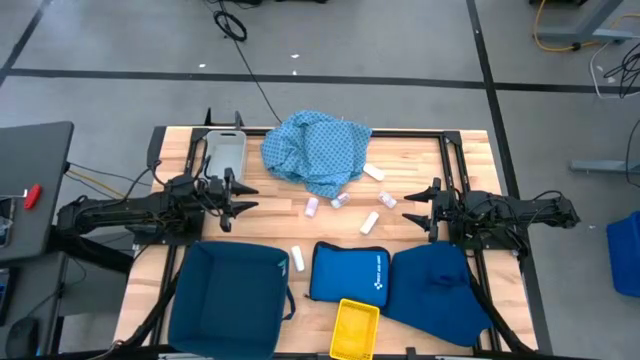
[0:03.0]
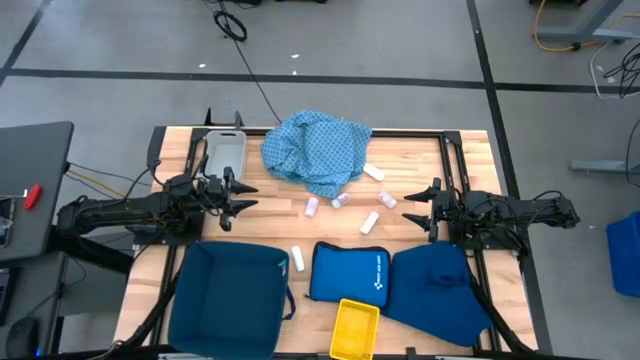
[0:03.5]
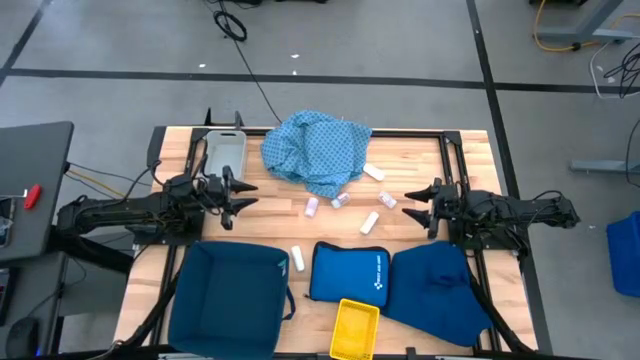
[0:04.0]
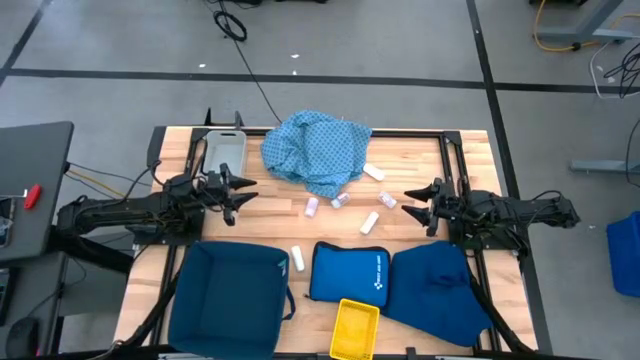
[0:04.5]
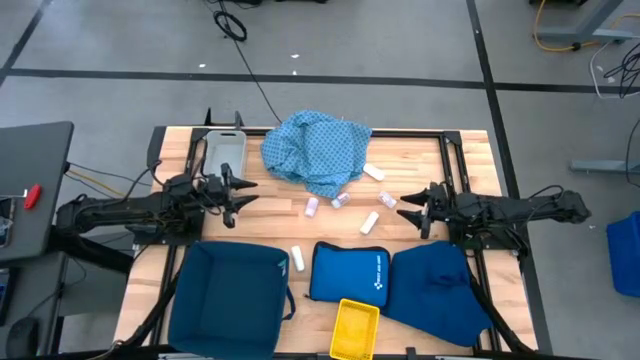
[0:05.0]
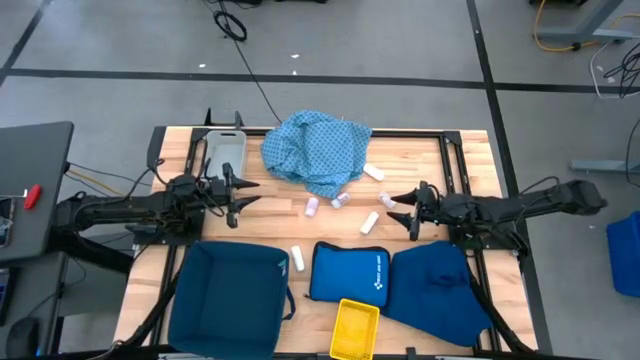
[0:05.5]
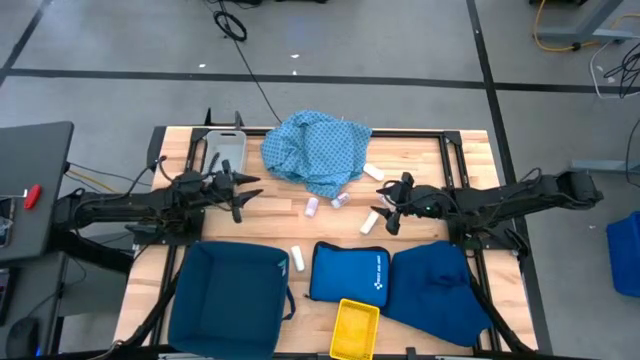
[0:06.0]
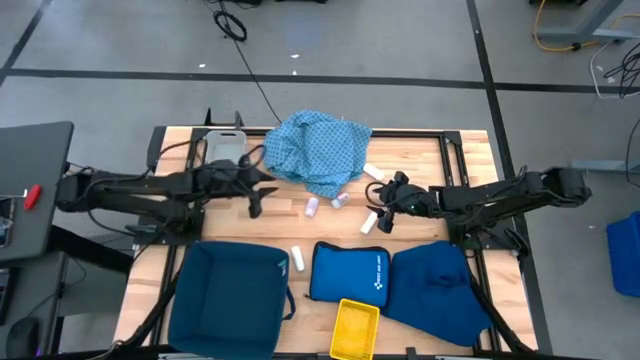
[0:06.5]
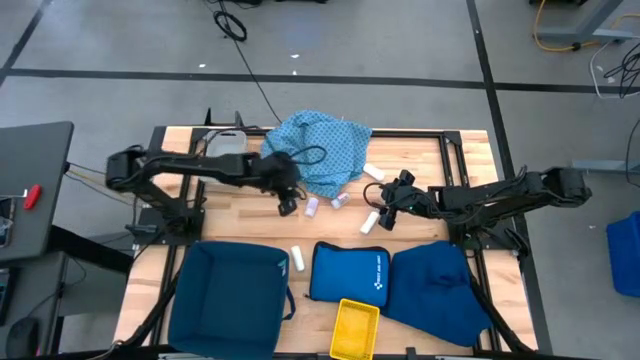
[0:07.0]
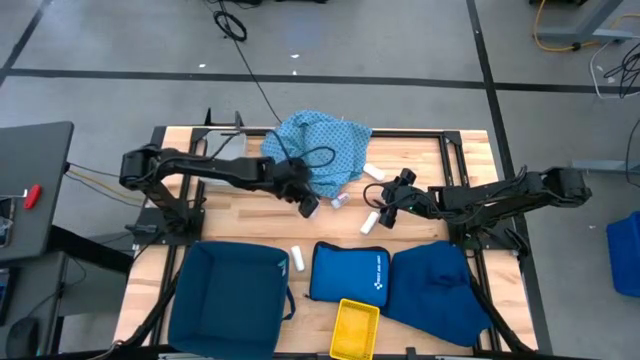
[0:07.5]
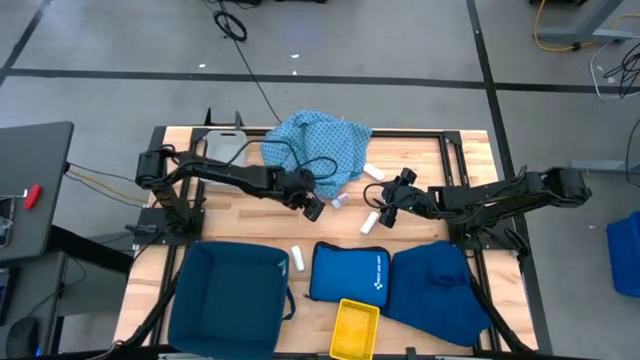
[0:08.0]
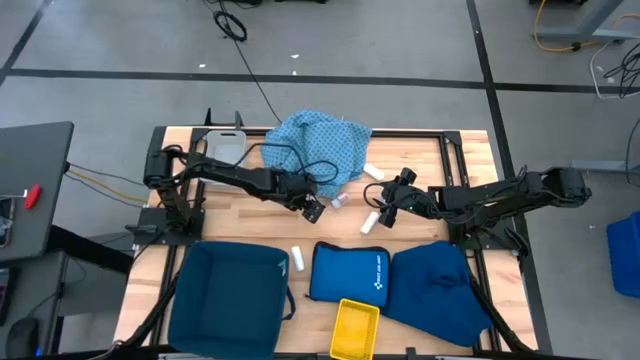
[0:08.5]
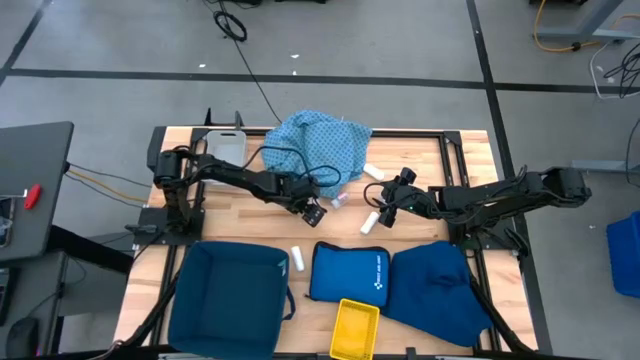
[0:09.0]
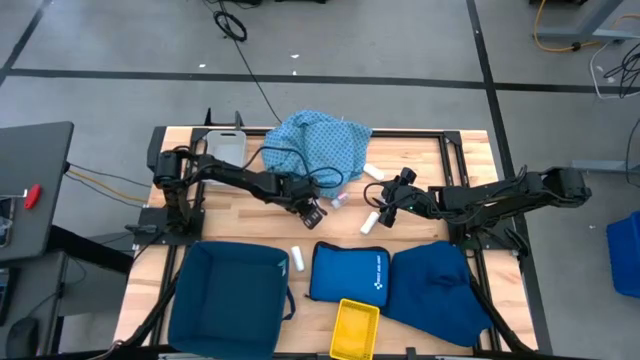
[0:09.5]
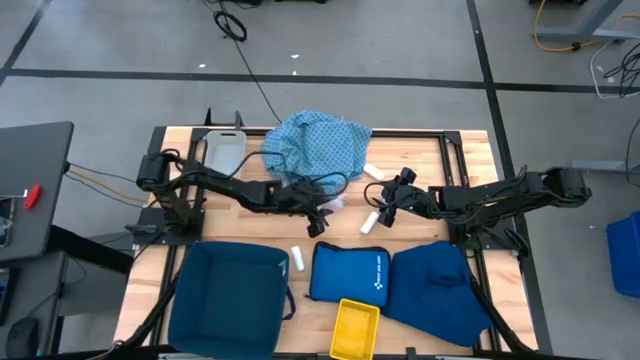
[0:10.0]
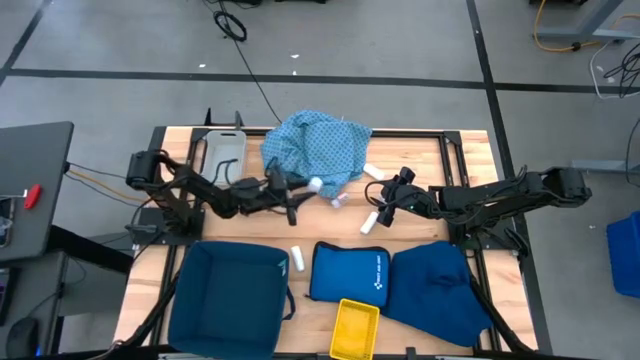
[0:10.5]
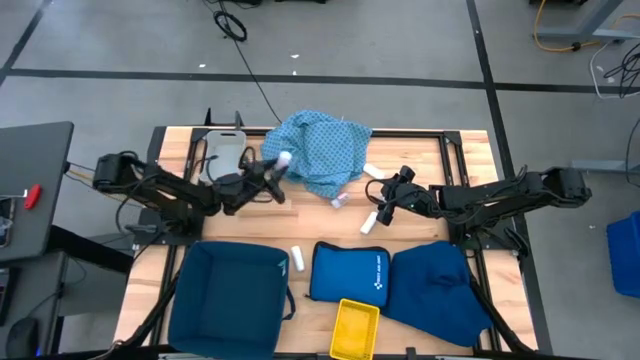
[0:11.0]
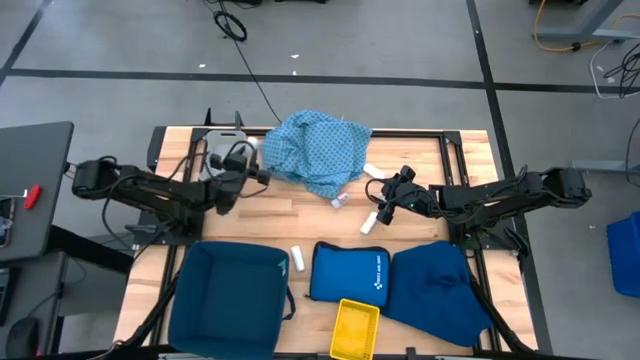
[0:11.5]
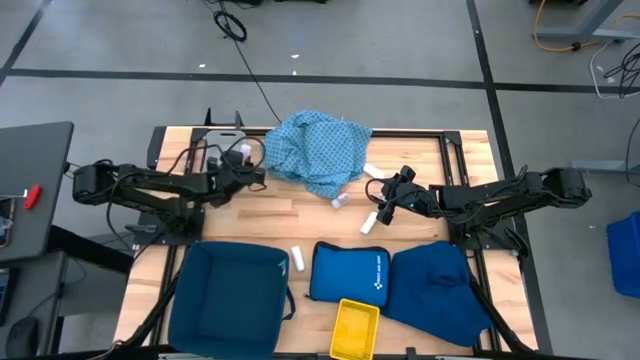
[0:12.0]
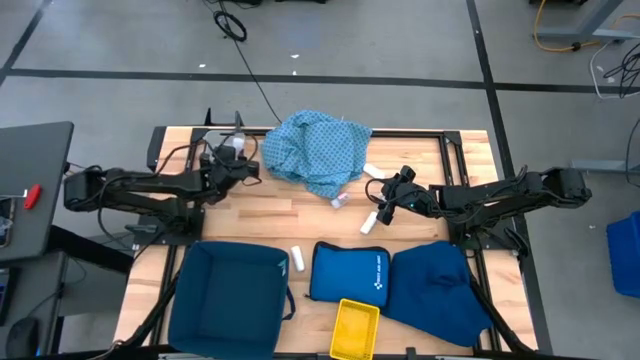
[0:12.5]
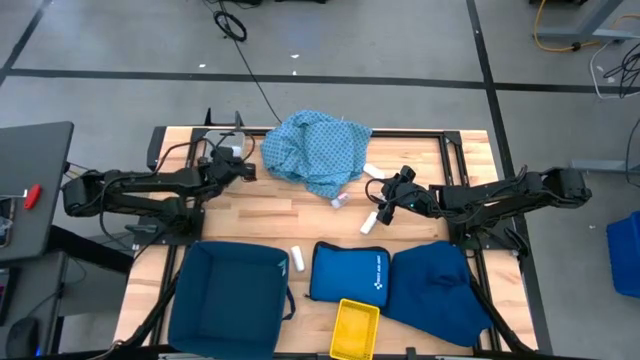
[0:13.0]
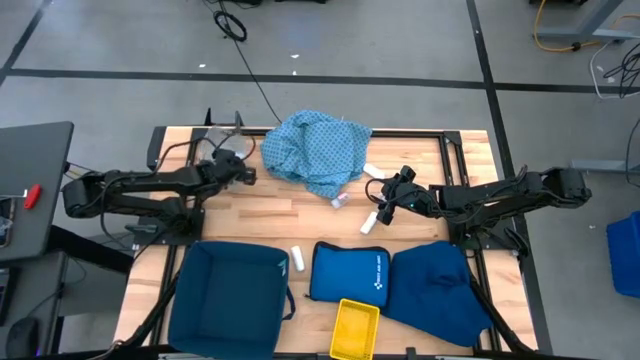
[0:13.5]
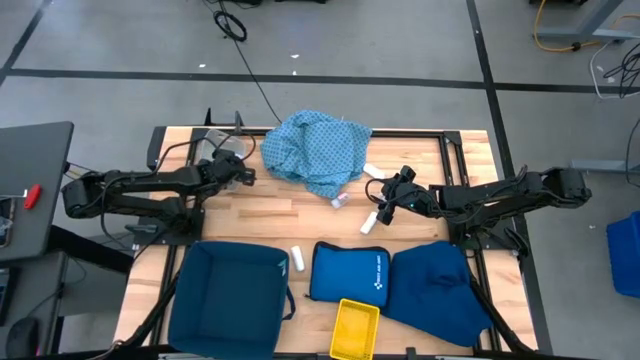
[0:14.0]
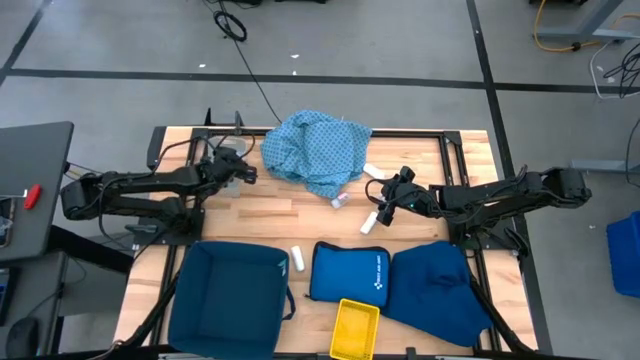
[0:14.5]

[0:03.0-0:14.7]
Task: Pick & place medical supplies in basket/bin
Put the white pill bottle into the gray bin

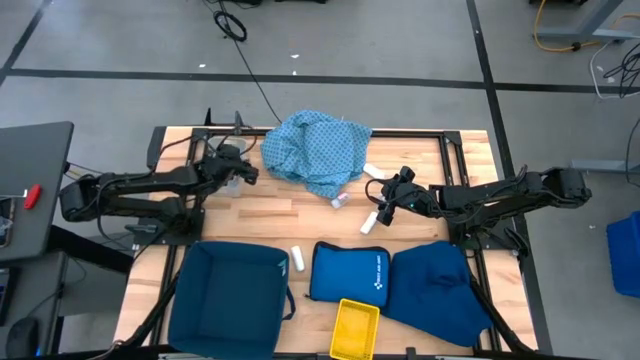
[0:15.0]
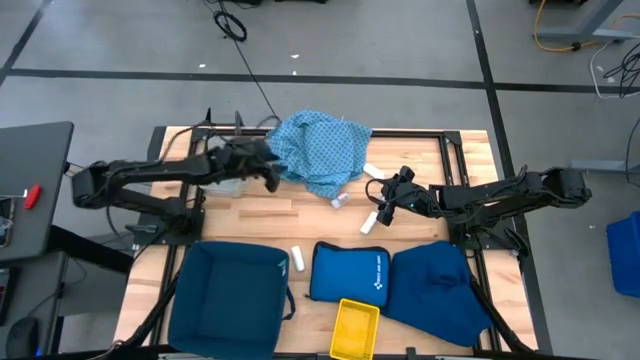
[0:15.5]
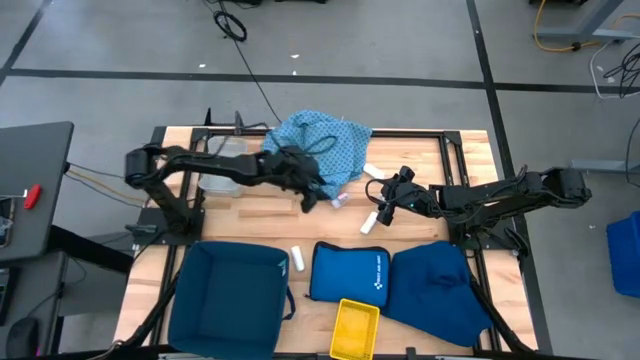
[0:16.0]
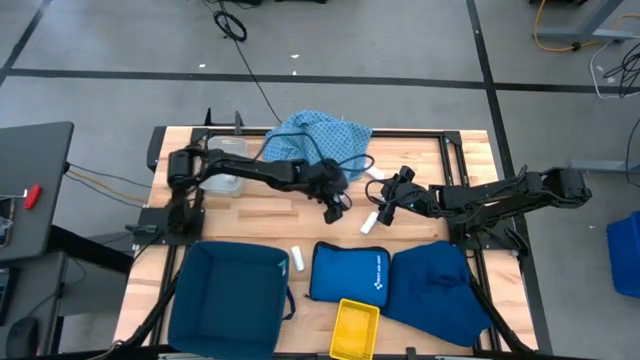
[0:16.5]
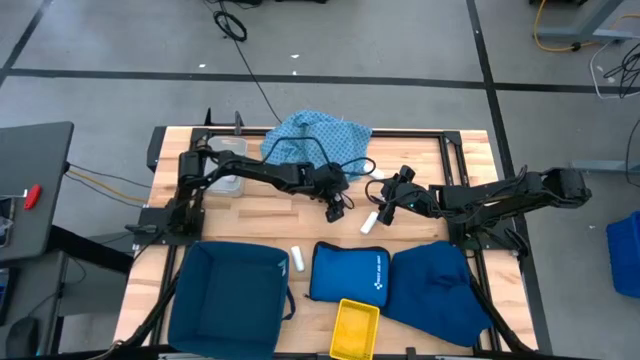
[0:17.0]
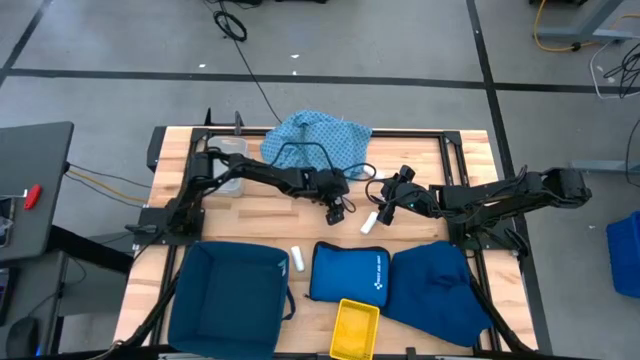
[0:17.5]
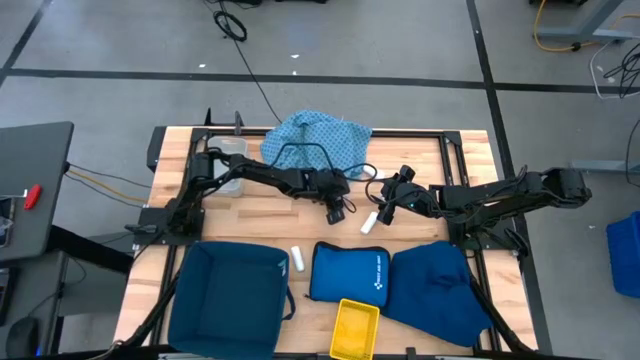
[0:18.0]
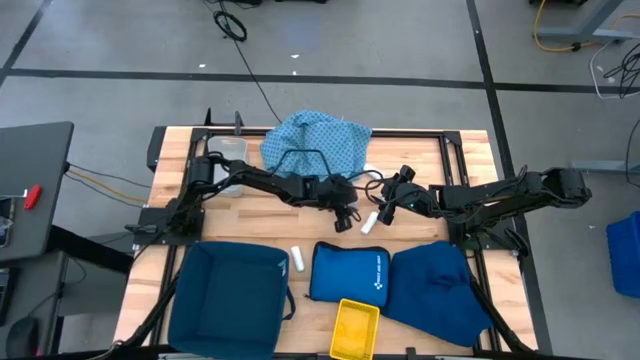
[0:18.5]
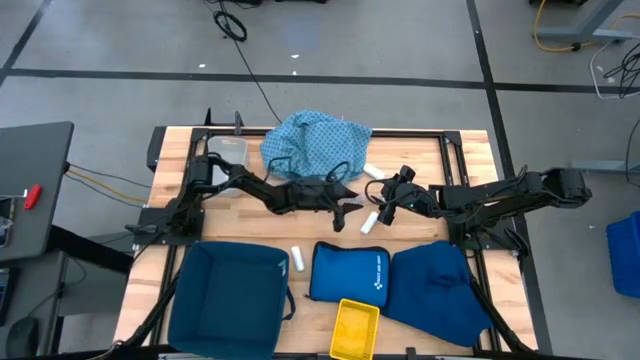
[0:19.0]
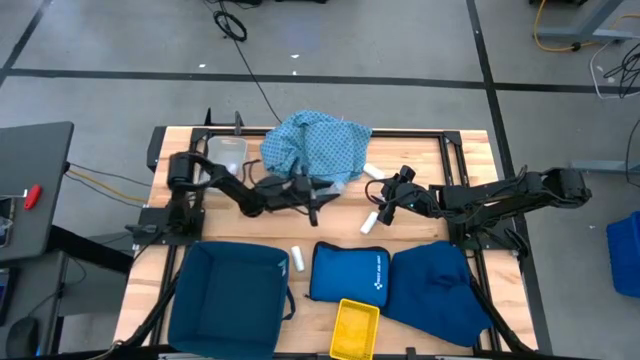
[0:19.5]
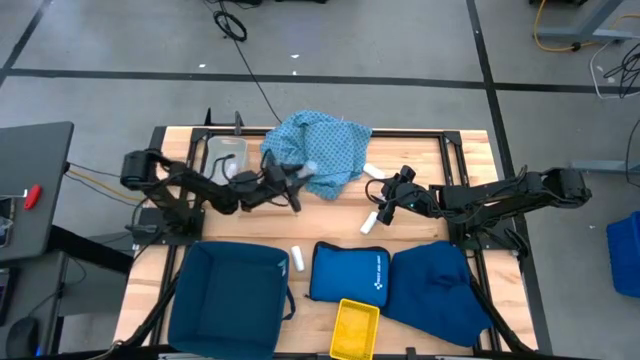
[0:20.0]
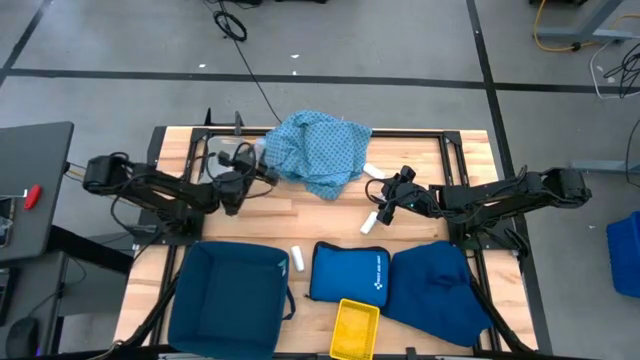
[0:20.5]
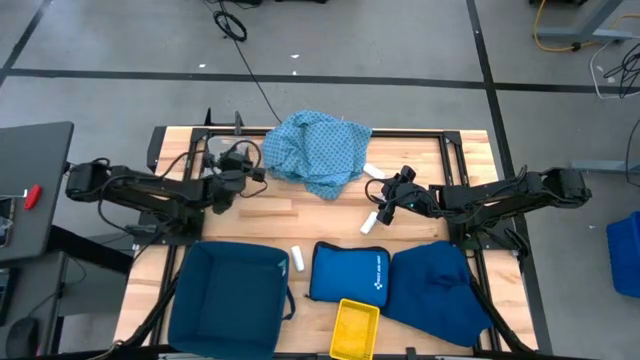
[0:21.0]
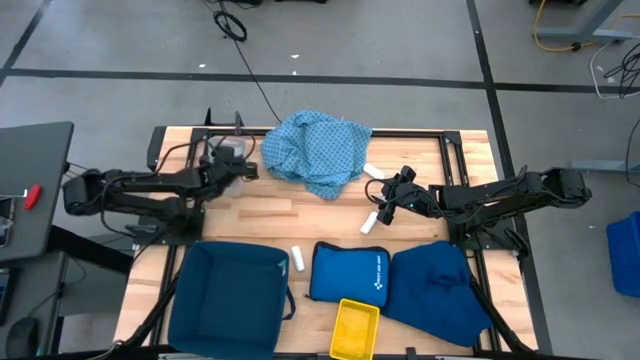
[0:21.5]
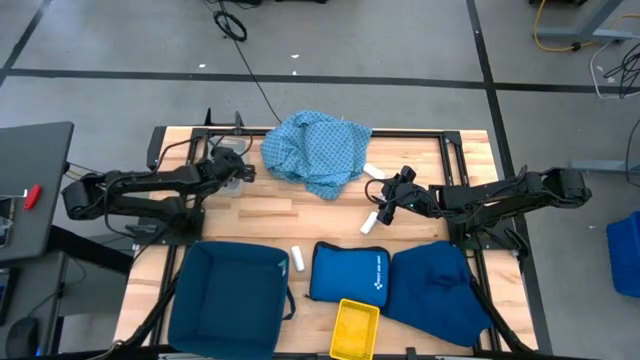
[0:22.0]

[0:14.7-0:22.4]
Put the left transparent pill bottle into the gray bin

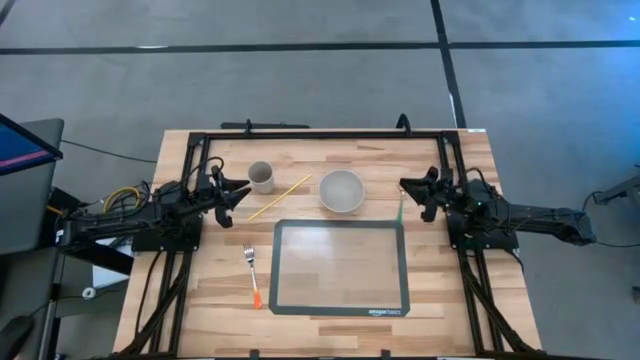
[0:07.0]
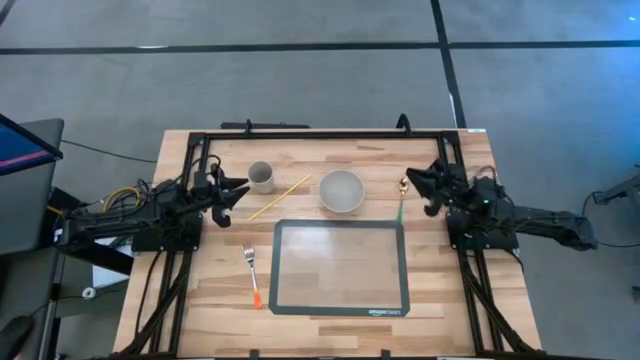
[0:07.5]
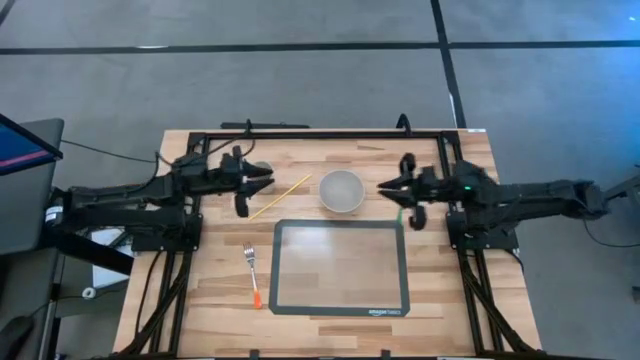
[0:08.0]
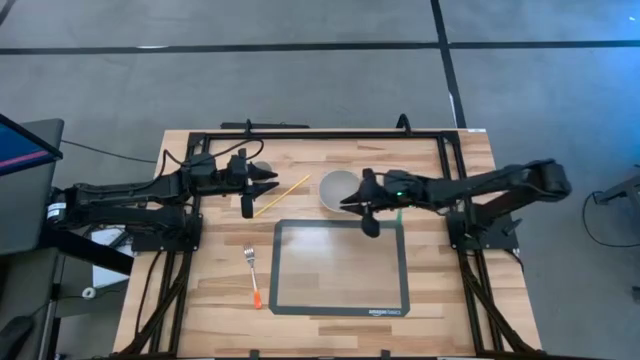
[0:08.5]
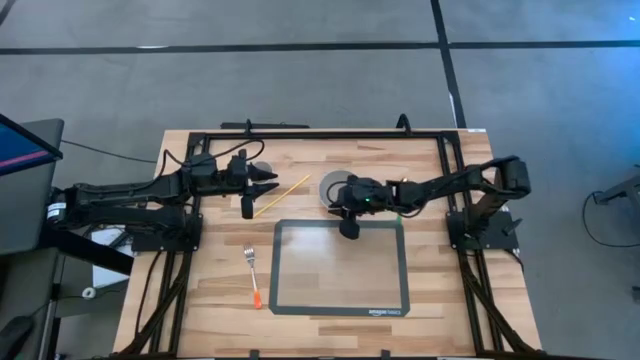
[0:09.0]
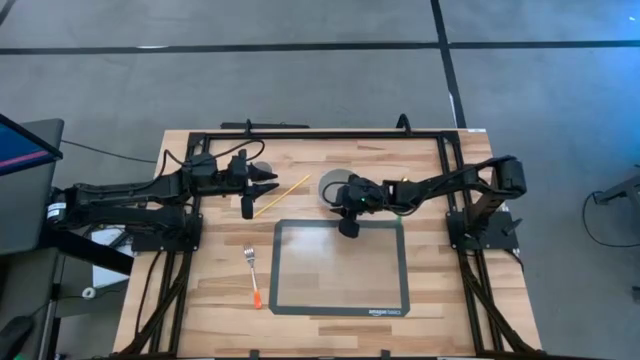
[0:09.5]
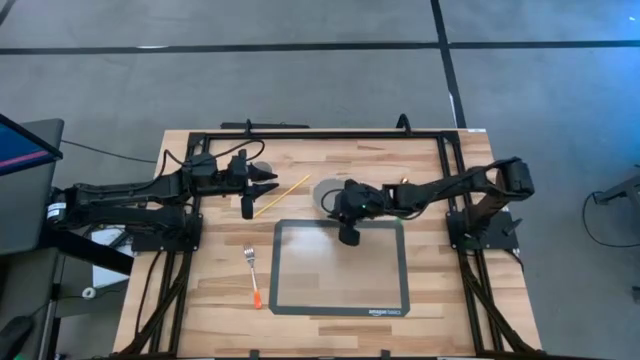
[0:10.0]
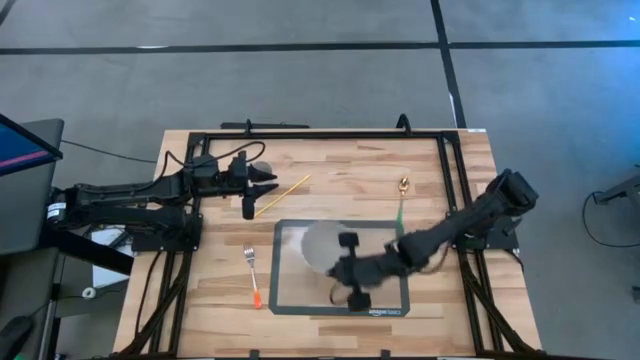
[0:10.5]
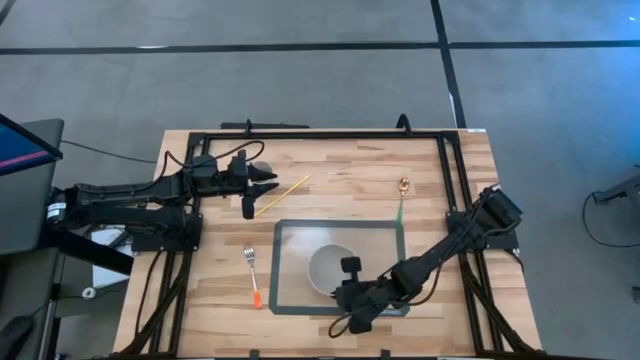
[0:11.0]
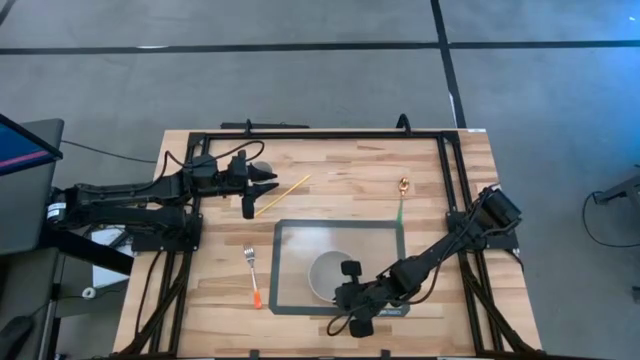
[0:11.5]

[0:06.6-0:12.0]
Task: Pick & Place Utensil
Put the gray bowl at the bottom of the mat
